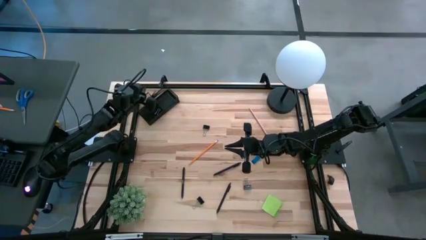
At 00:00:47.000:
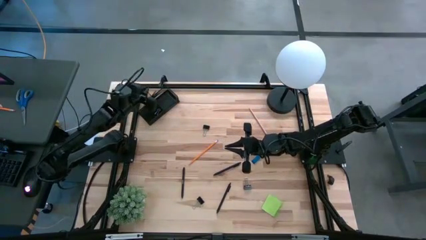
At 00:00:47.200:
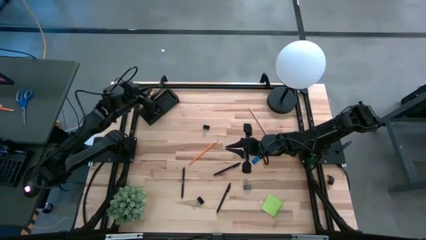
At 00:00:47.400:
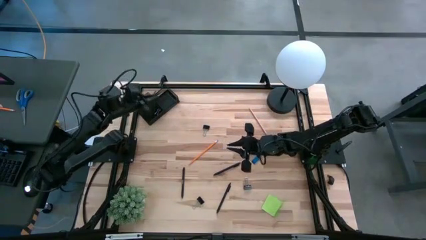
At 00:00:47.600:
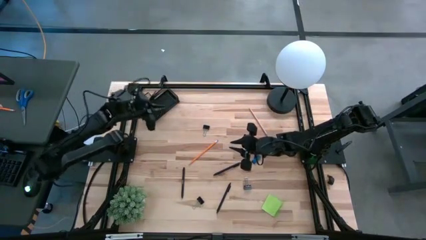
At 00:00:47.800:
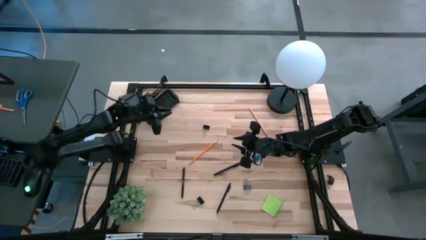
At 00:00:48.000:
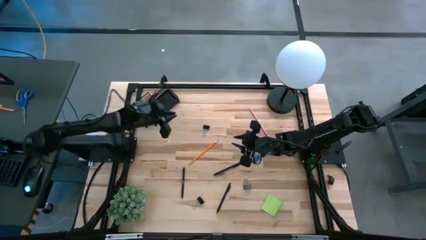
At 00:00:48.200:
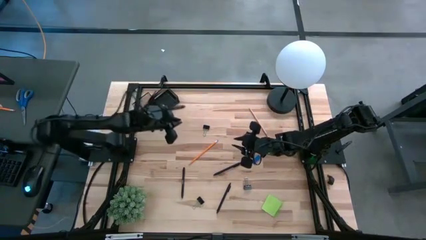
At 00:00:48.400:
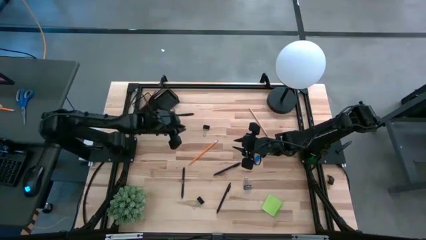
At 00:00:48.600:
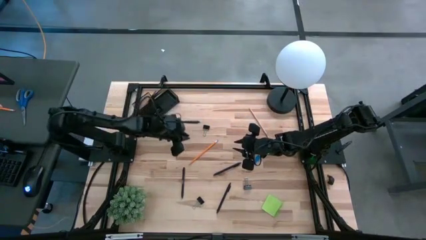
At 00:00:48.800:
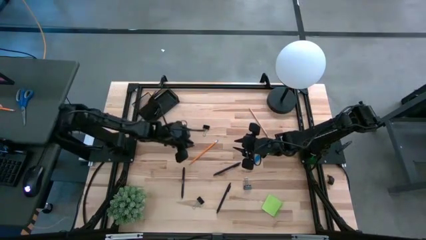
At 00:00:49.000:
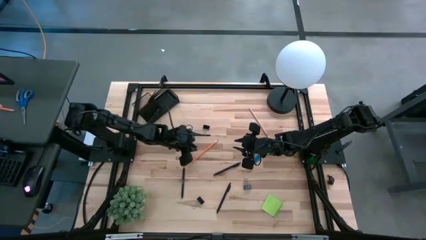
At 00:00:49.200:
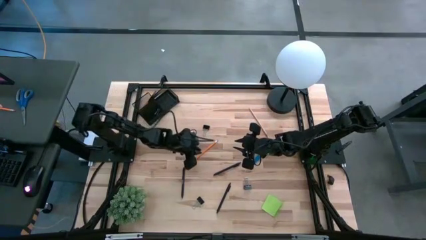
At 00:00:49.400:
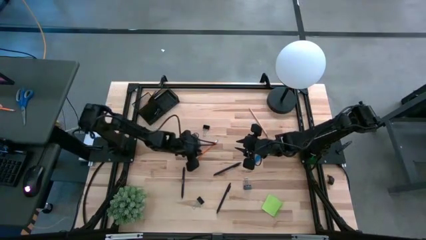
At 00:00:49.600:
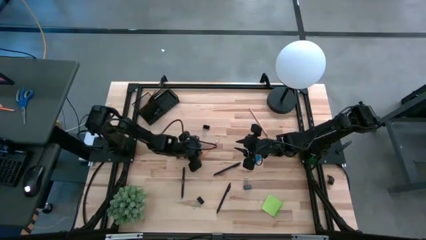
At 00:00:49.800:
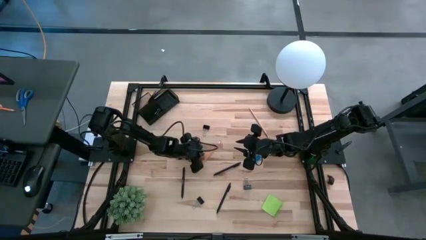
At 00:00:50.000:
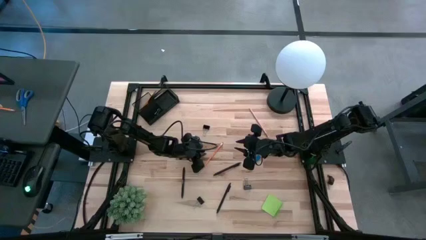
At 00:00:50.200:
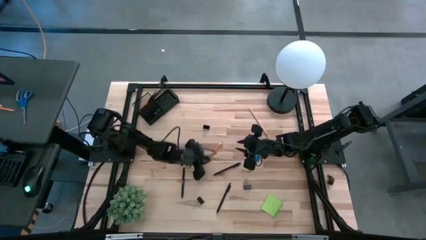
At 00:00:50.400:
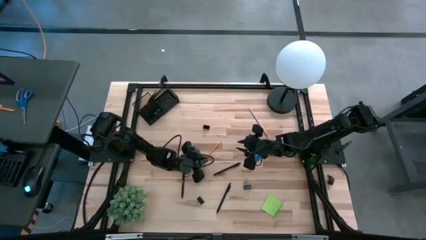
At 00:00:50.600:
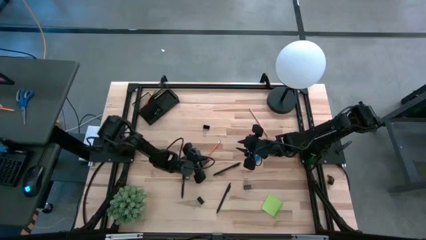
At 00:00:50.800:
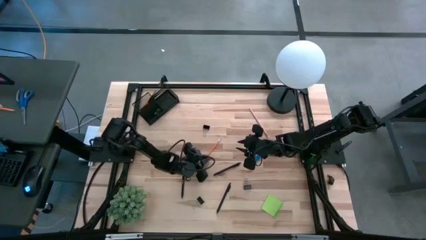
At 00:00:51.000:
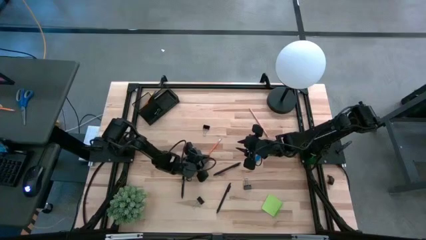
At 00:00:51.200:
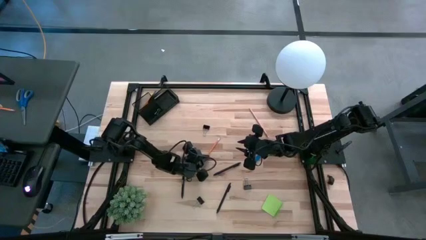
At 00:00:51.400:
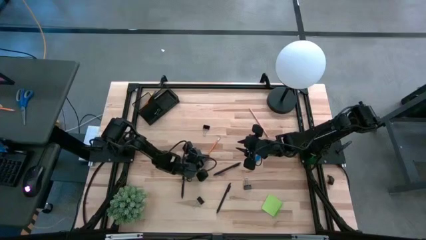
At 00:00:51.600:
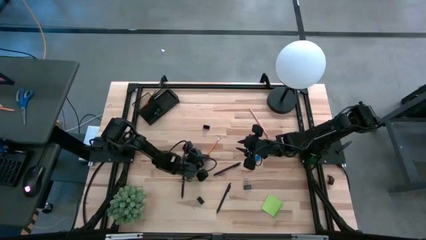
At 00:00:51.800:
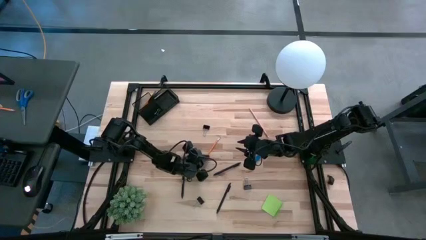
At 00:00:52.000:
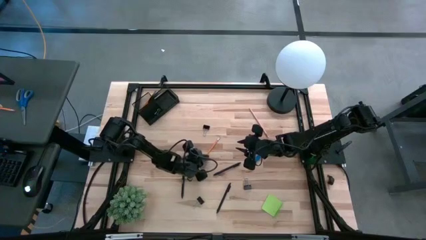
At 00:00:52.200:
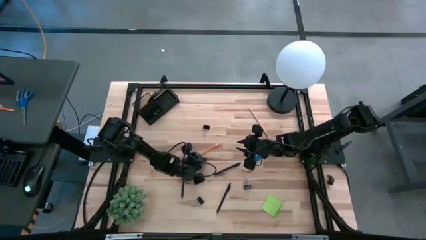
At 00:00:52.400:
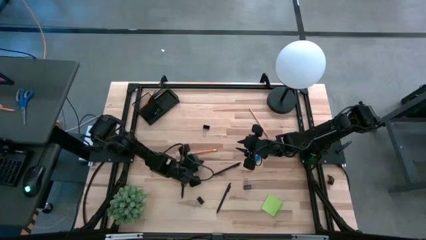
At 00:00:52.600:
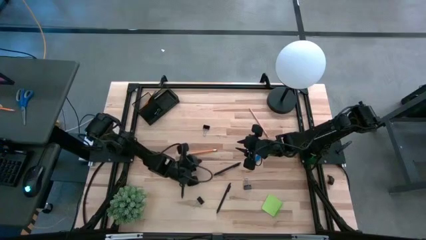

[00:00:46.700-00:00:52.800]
Task: Pick and place office supplies into organizer
Put the orange pencil into the black desk organizer

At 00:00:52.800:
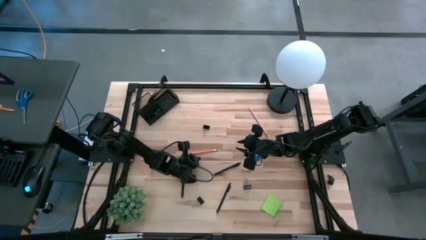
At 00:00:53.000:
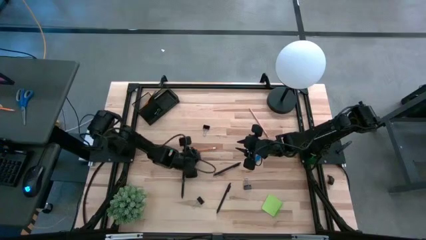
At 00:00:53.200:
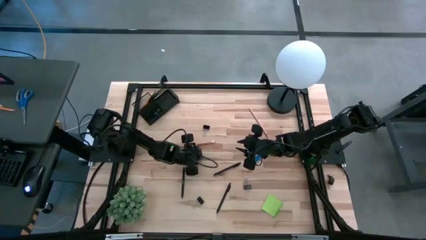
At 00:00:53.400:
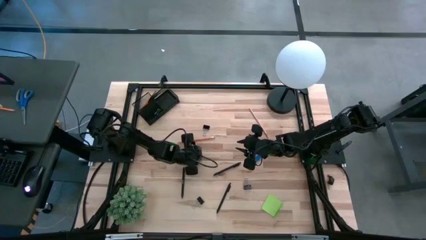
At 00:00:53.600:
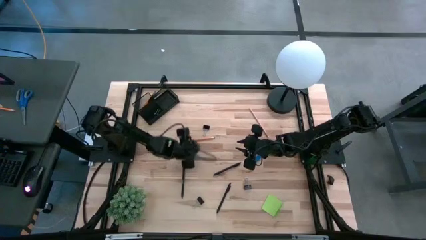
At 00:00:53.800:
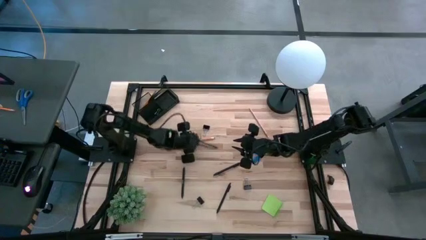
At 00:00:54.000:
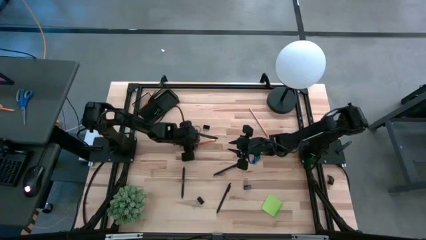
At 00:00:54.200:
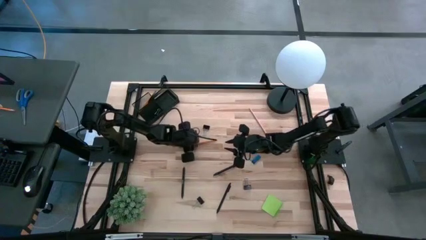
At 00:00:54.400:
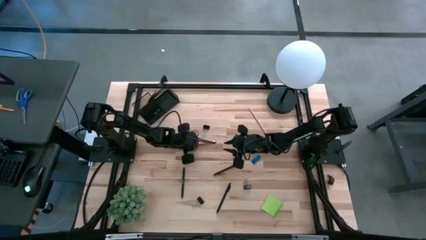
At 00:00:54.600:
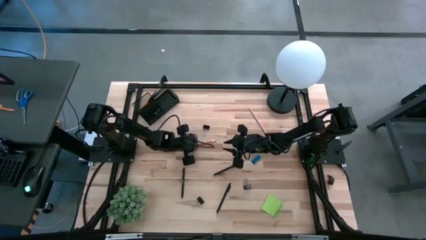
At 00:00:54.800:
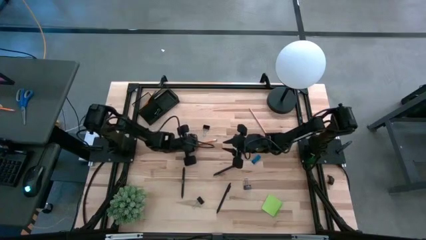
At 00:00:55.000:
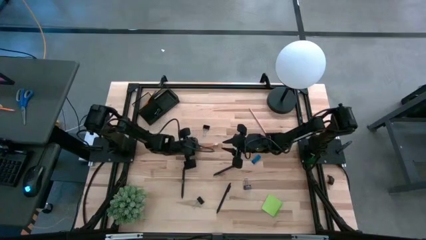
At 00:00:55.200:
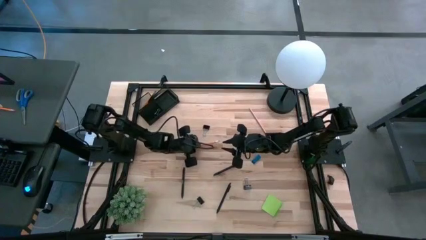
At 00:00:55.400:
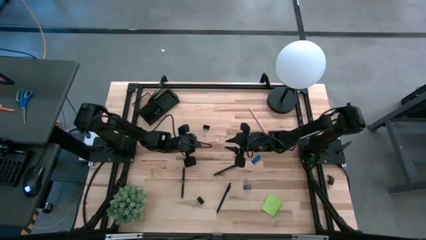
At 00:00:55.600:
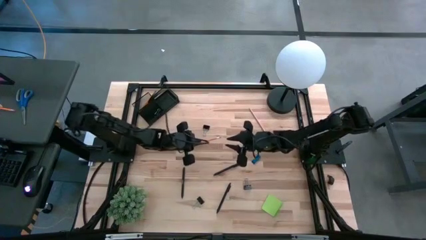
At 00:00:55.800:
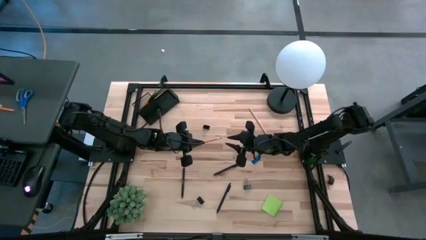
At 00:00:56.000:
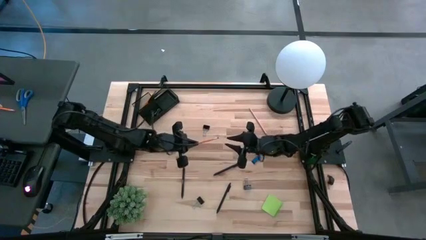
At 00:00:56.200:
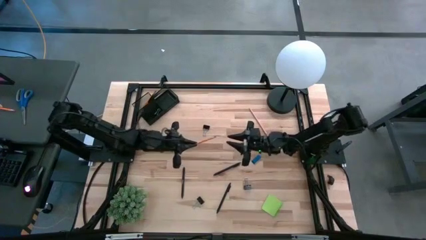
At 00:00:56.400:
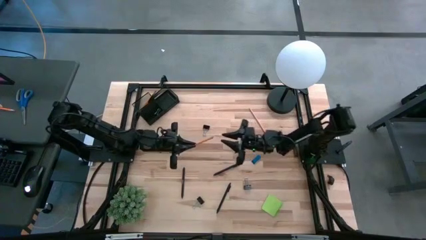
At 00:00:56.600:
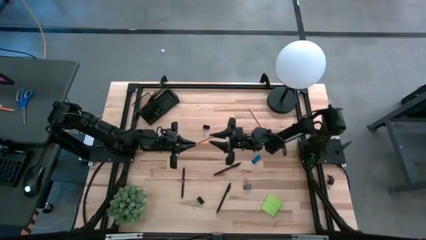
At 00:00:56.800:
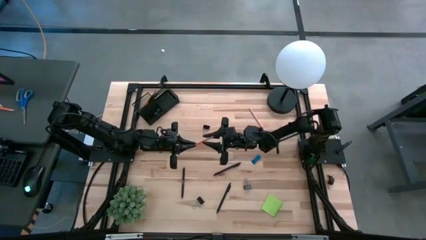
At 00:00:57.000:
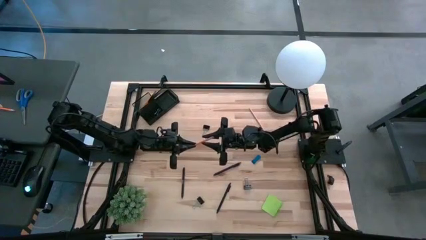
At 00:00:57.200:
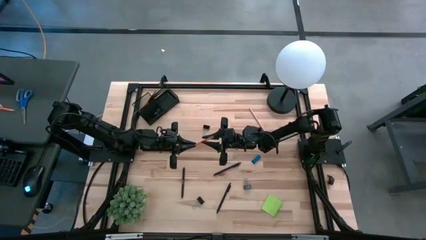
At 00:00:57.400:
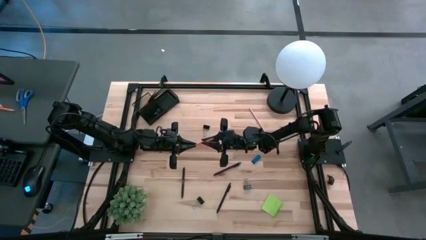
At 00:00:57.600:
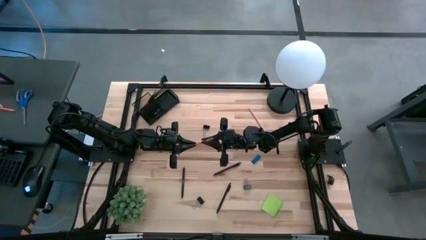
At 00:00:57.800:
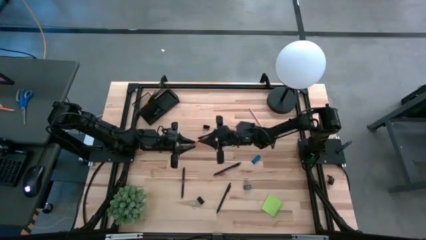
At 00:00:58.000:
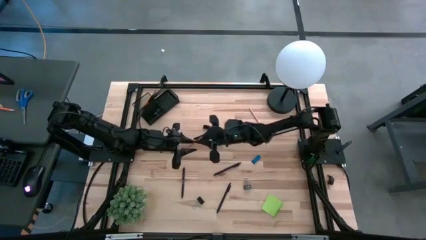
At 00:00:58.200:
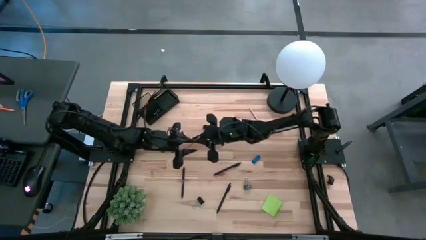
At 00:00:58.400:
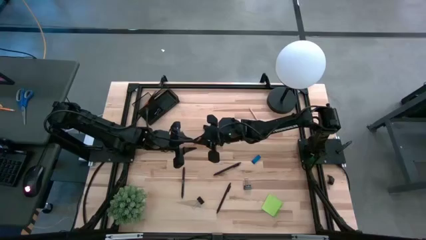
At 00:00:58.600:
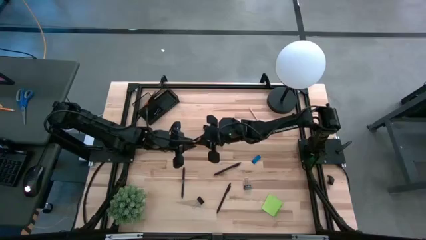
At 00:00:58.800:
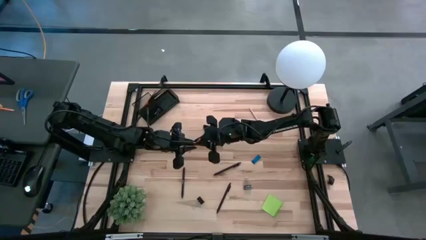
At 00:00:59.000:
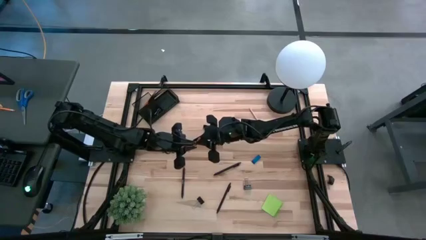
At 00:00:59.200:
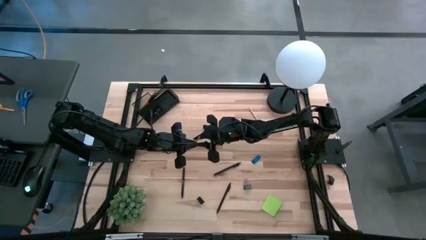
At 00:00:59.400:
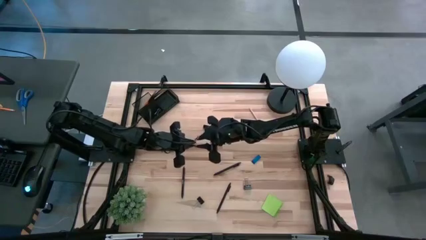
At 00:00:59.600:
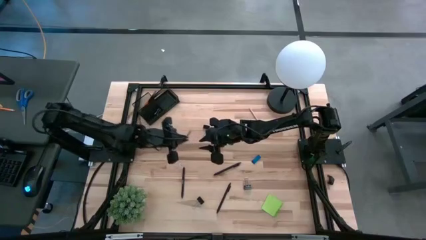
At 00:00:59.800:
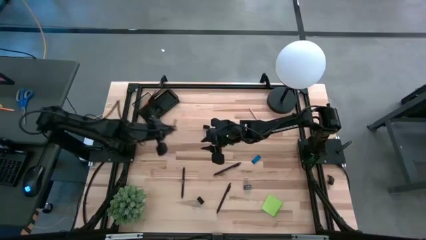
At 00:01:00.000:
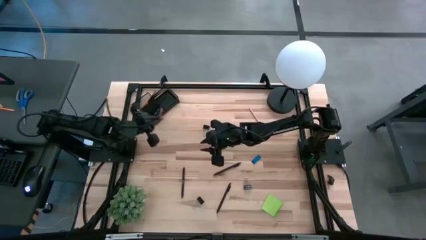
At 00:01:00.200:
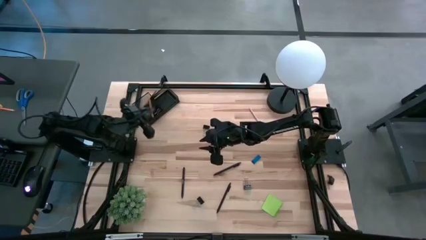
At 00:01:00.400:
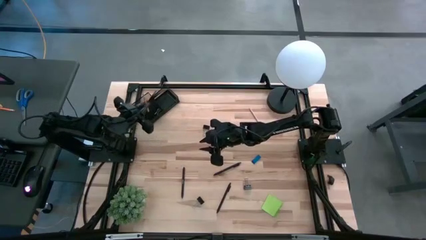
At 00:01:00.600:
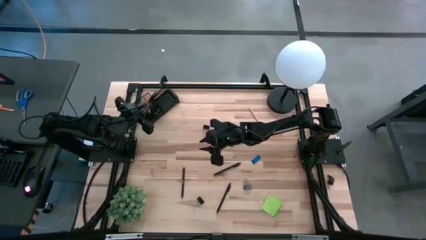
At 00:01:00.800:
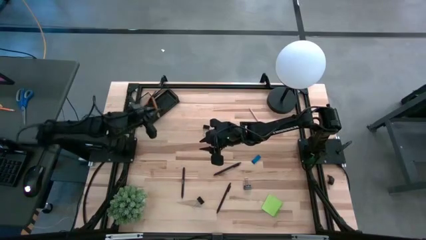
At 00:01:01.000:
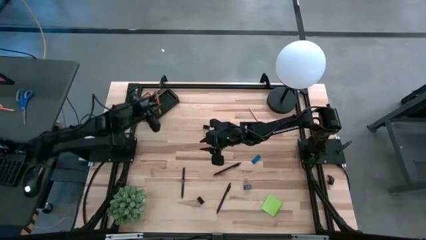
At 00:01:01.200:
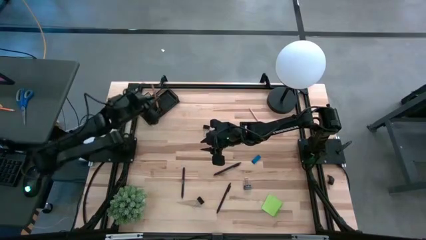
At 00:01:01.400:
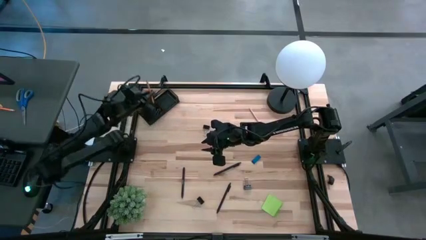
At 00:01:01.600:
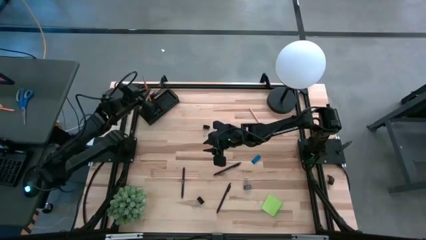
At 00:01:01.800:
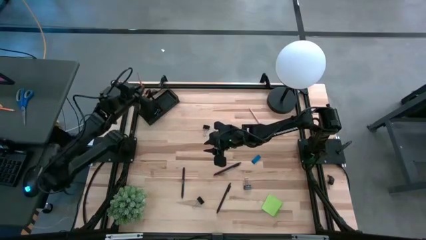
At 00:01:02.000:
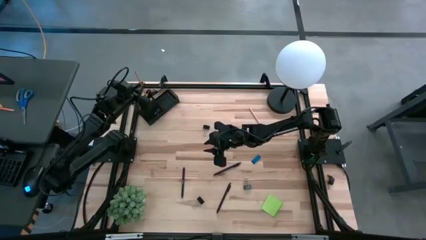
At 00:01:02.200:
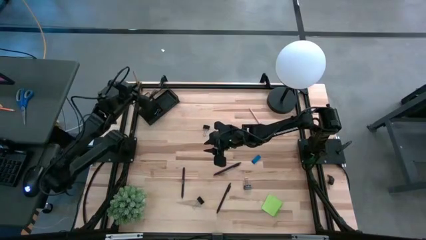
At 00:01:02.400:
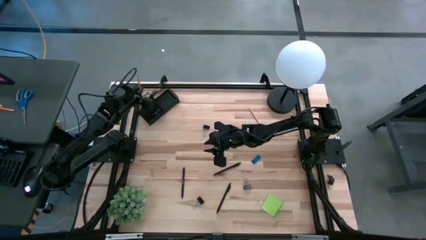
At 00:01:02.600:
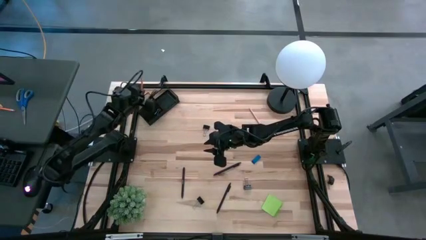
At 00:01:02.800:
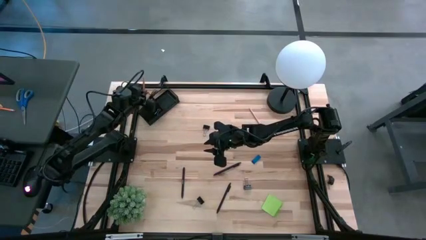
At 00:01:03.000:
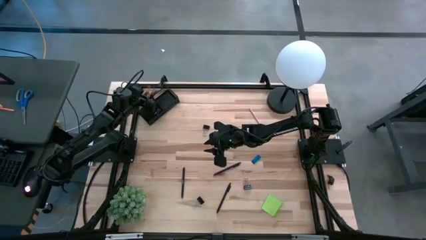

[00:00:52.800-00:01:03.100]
Put the orange pencil into the black desk organizer
